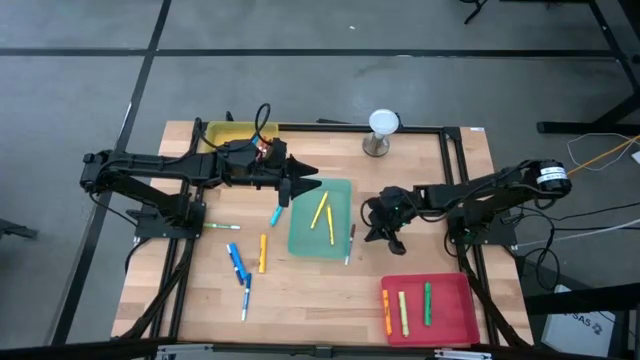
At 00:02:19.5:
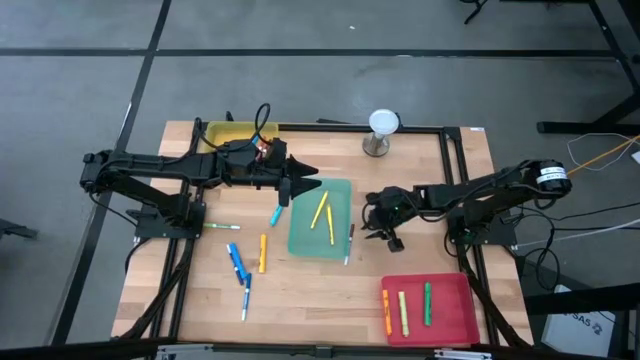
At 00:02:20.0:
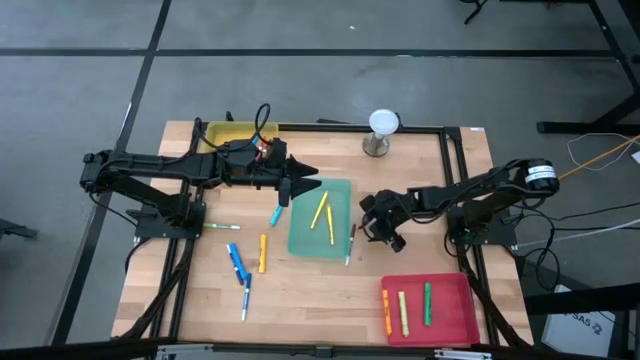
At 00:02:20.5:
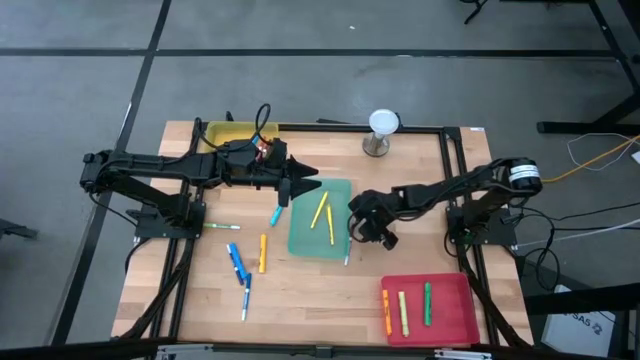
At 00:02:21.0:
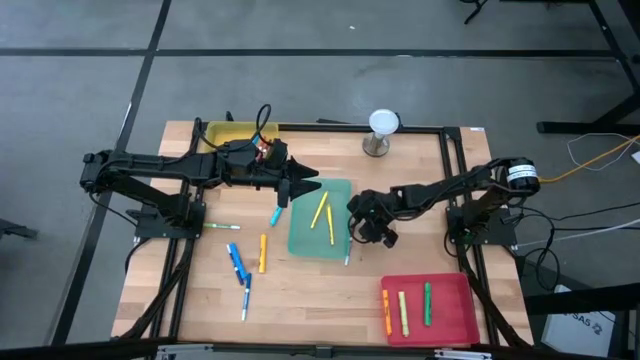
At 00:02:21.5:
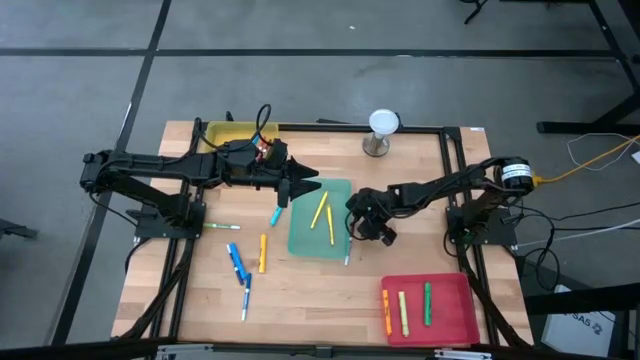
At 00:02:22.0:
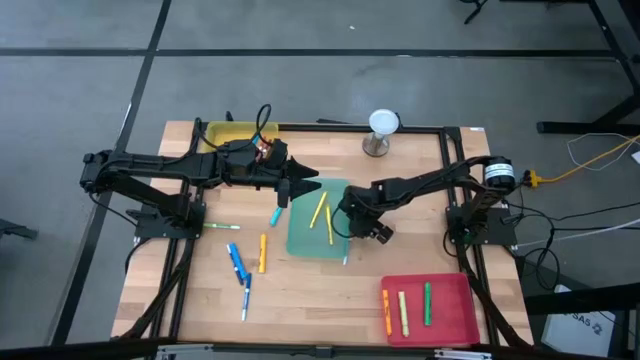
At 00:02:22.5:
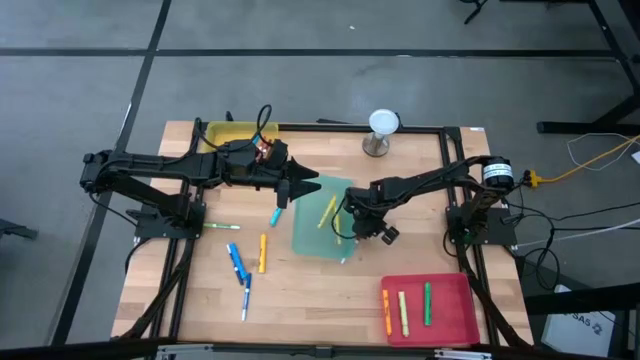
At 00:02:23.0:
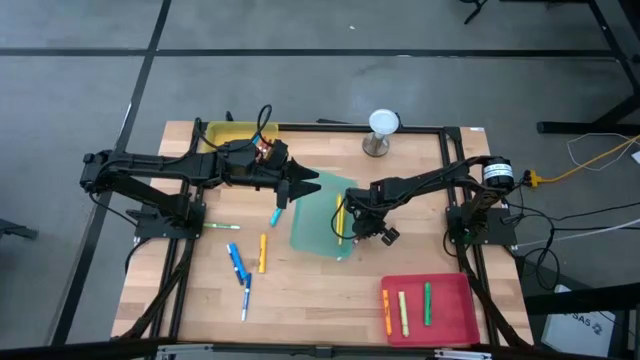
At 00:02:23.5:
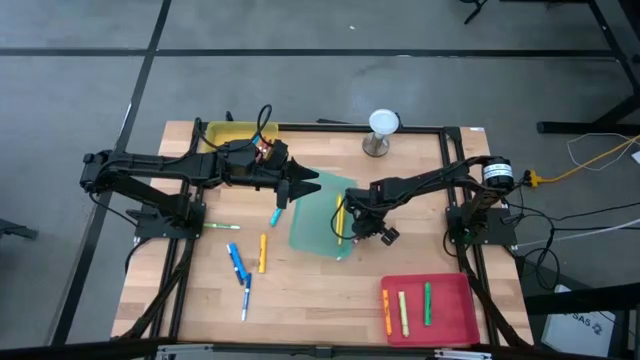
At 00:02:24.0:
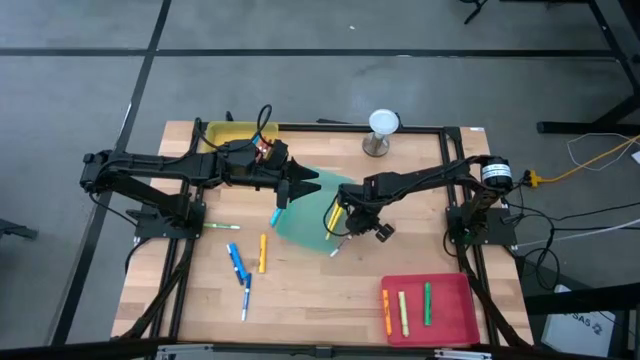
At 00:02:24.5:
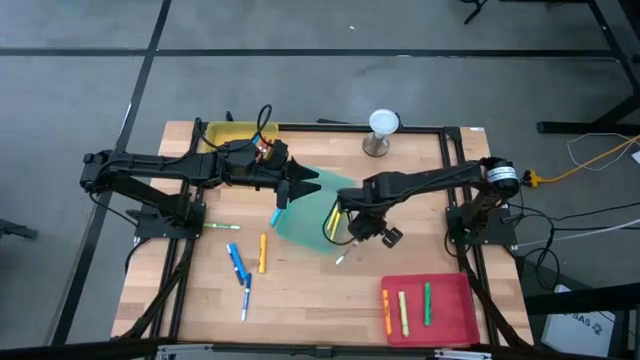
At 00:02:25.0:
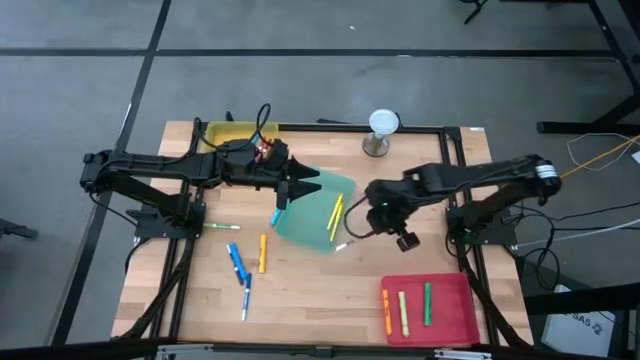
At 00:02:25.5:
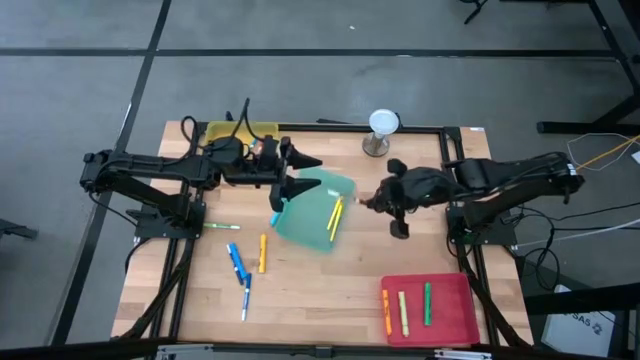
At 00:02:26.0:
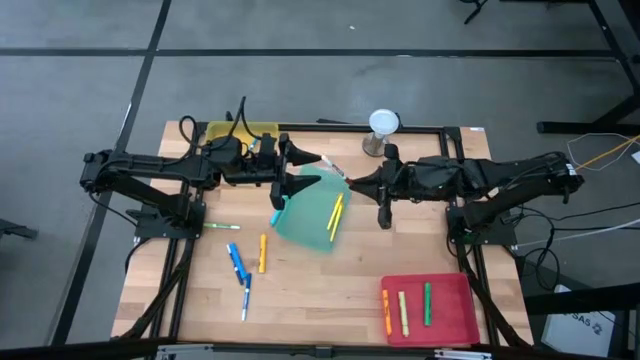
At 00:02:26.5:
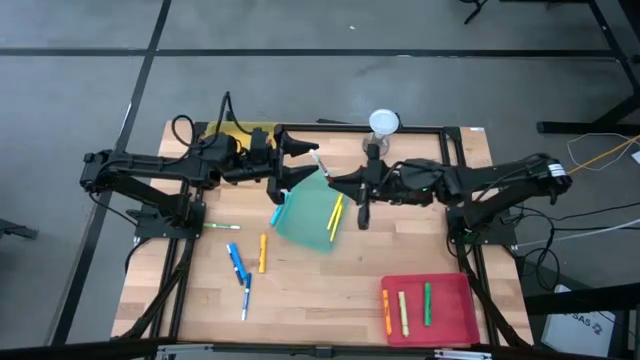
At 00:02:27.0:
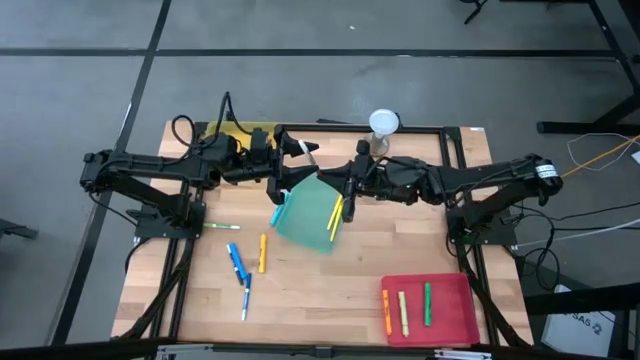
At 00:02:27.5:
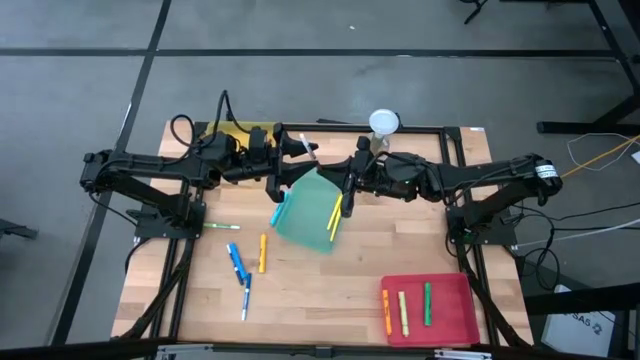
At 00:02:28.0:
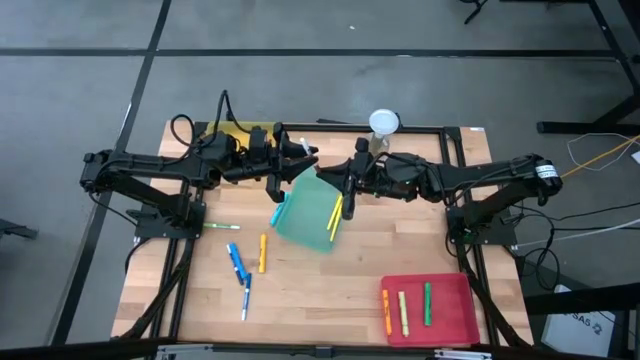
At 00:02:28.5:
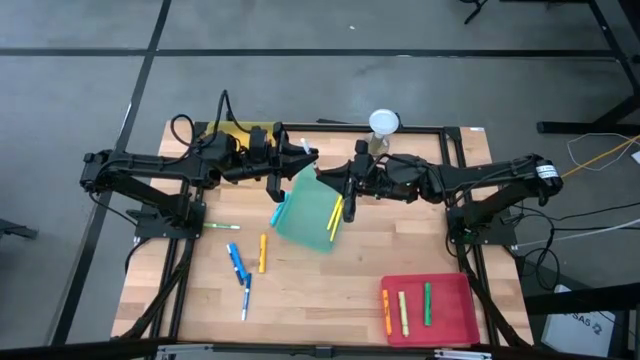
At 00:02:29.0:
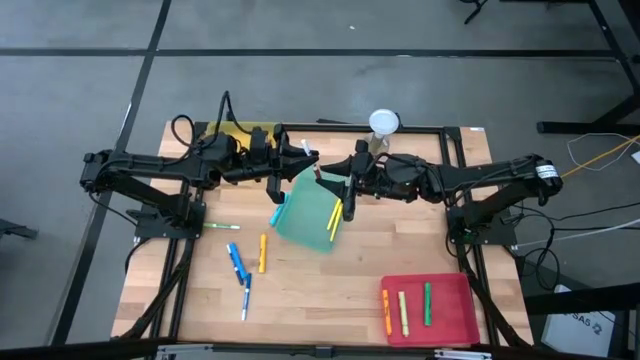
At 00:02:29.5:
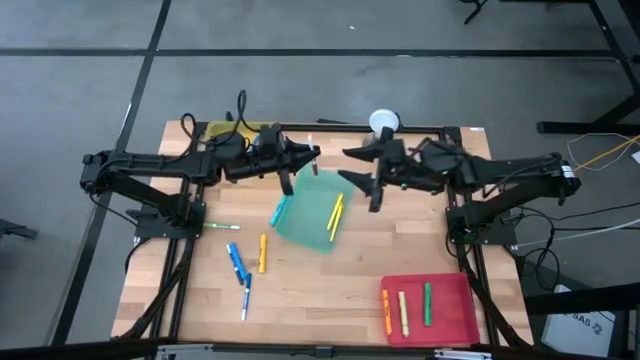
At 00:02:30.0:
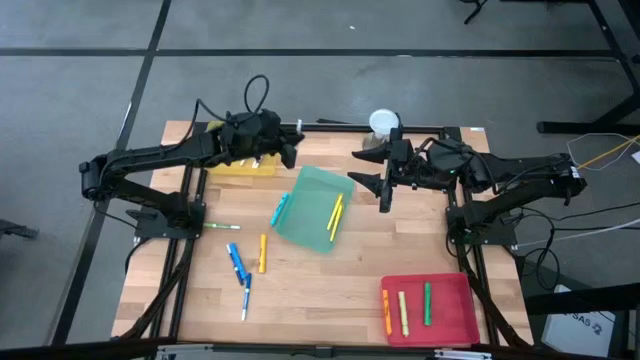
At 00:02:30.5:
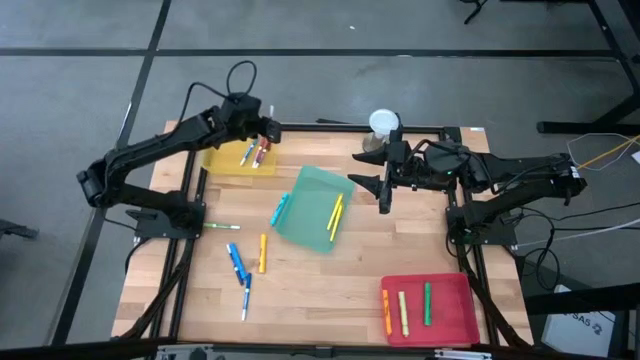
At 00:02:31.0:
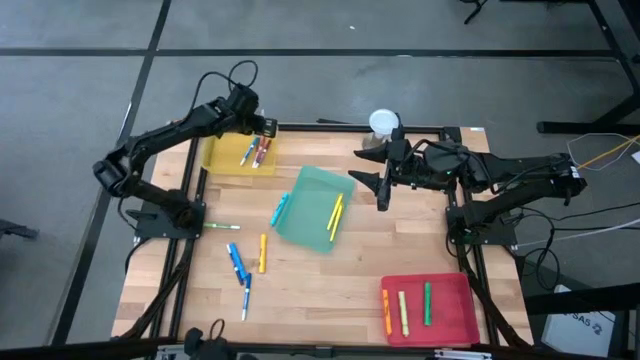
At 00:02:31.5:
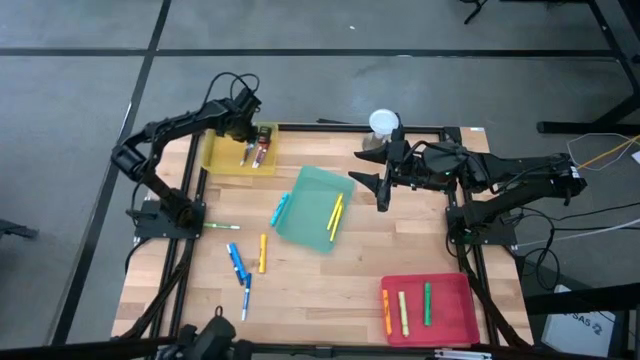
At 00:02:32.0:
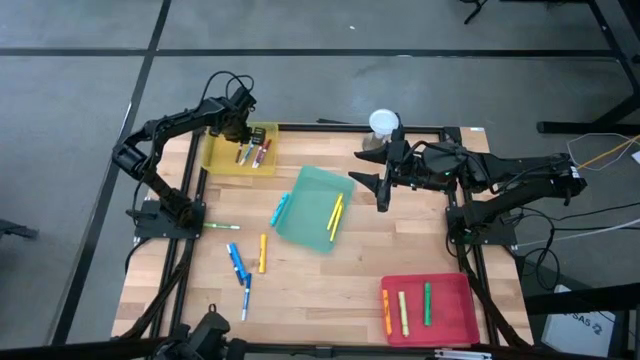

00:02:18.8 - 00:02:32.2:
Task: Pick & Place Markers
Put the brown marker pen into the yellow bin

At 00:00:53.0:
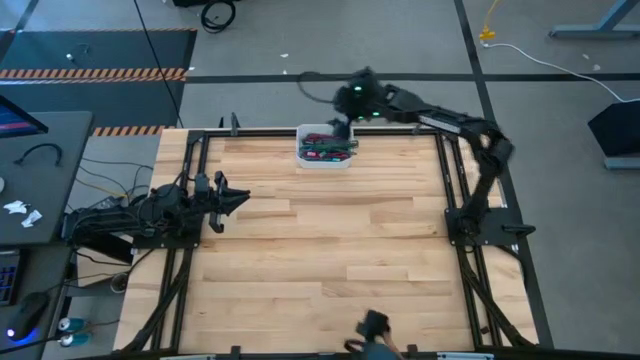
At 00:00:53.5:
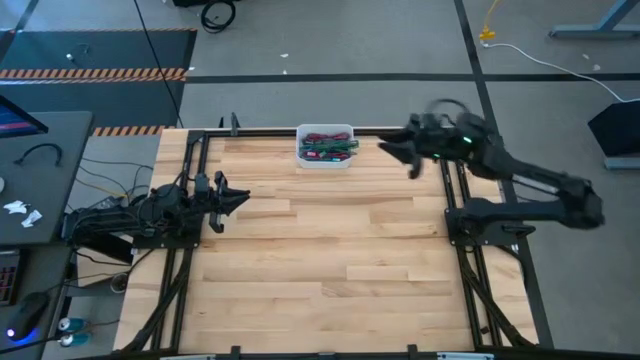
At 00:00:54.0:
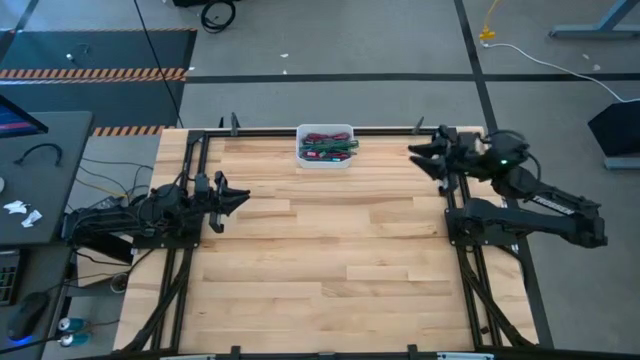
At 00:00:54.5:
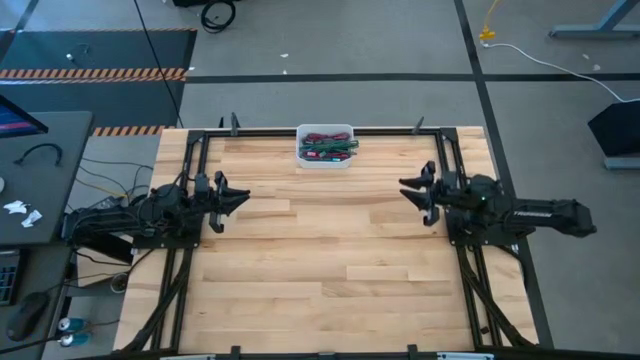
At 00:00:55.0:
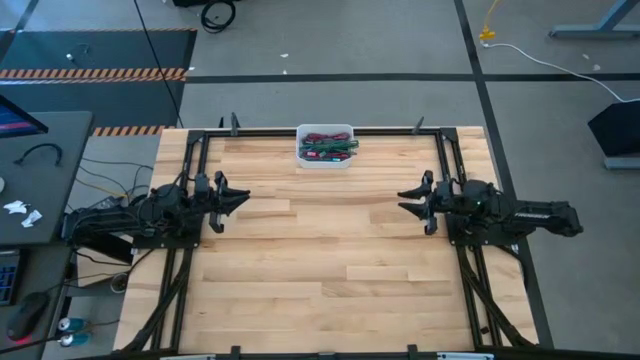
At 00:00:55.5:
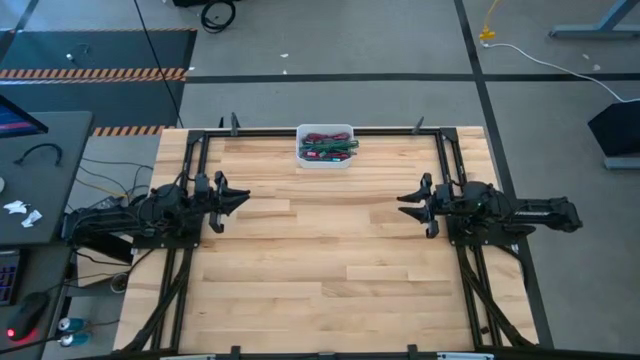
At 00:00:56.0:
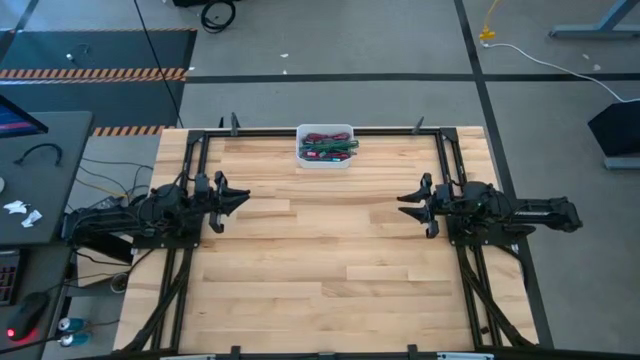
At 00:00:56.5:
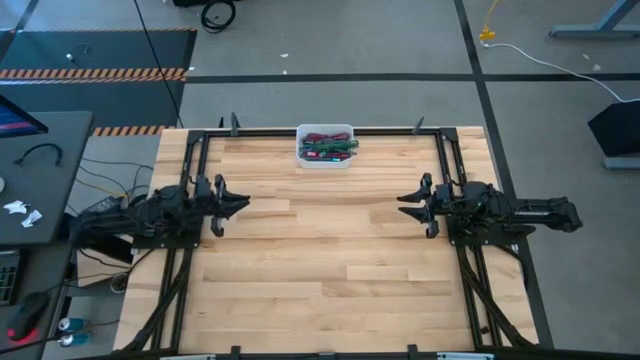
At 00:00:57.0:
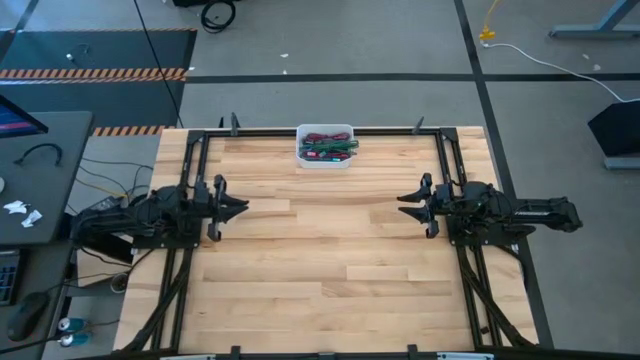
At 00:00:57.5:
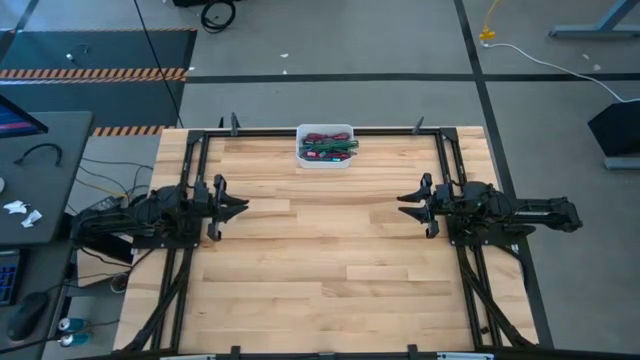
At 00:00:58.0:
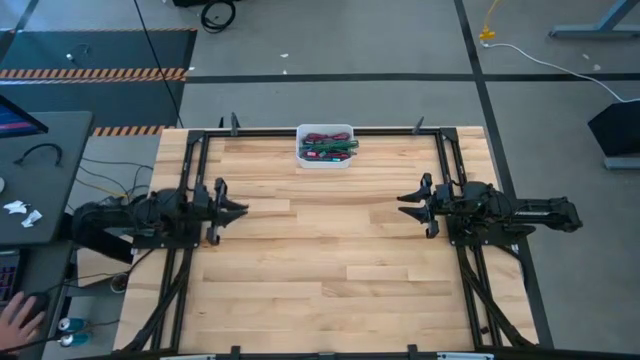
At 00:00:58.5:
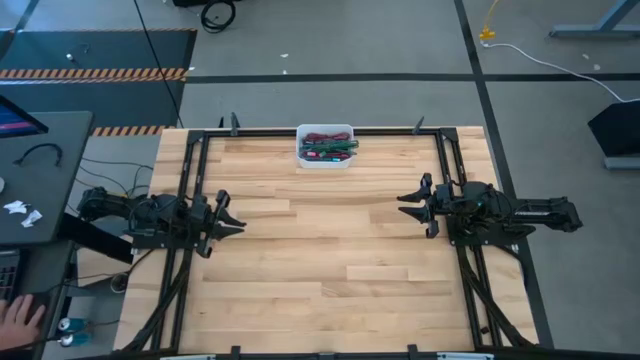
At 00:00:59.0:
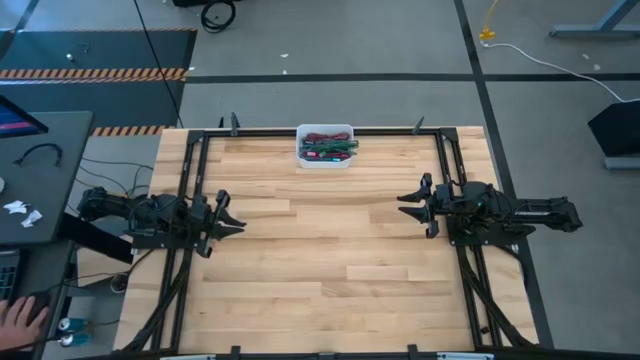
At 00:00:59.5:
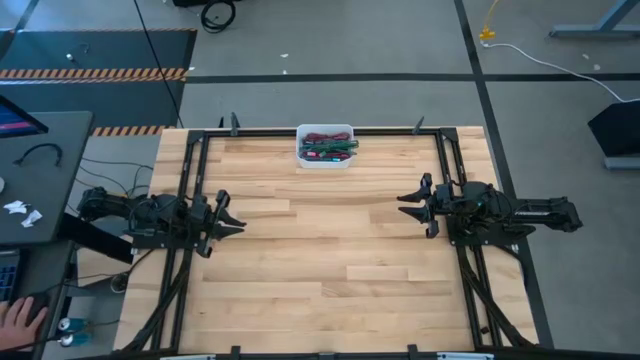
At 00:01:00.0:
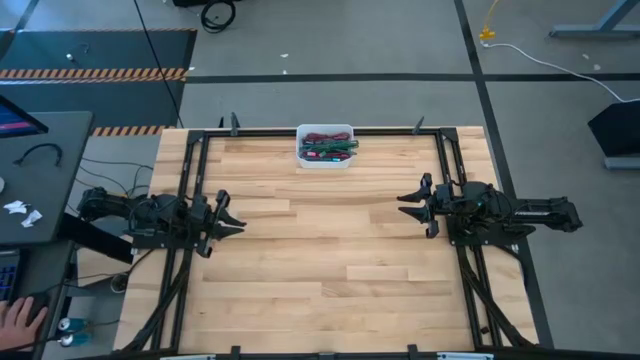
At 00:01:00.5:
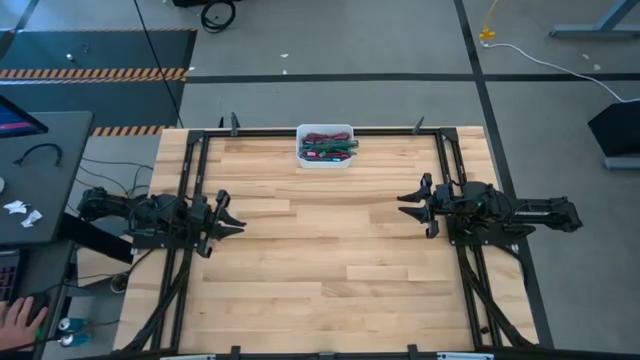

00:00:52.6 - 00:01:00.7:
Task: Pick and place USB-C Cables
Return to Home Position
